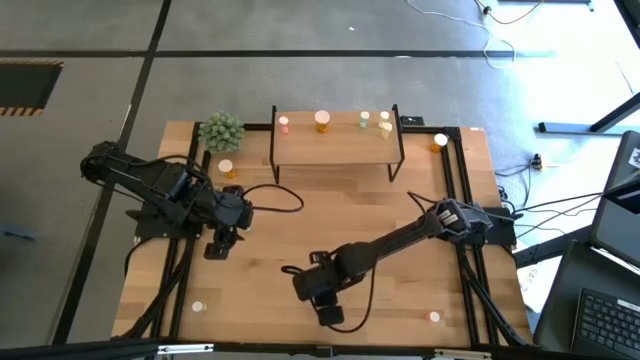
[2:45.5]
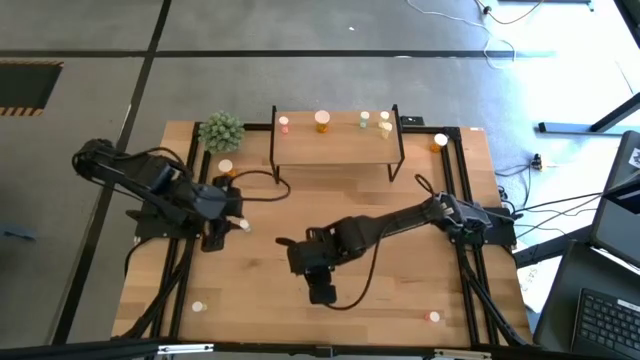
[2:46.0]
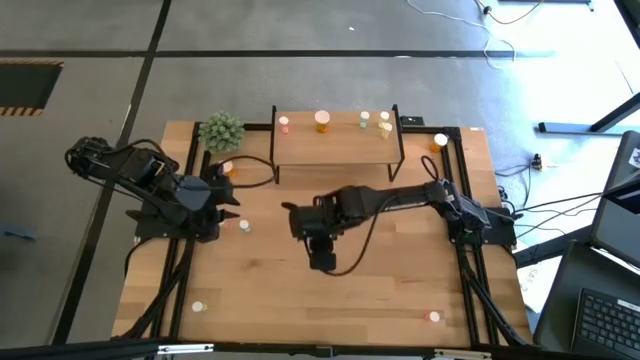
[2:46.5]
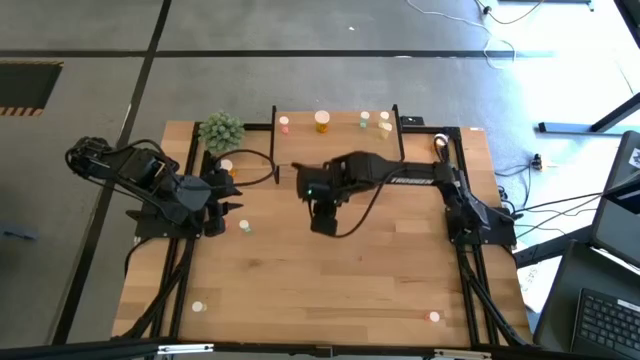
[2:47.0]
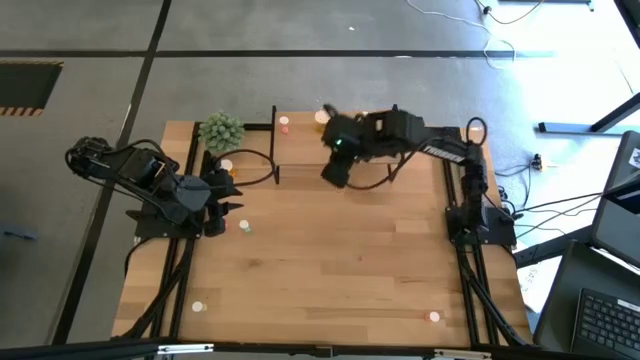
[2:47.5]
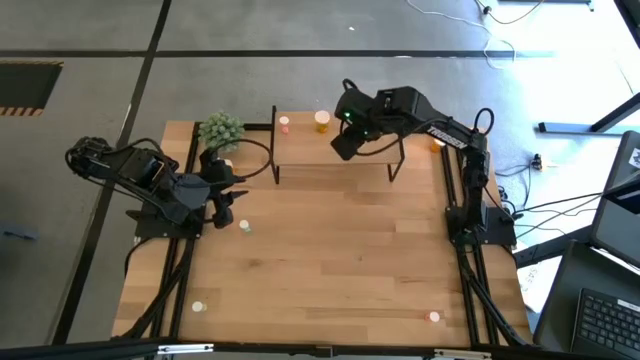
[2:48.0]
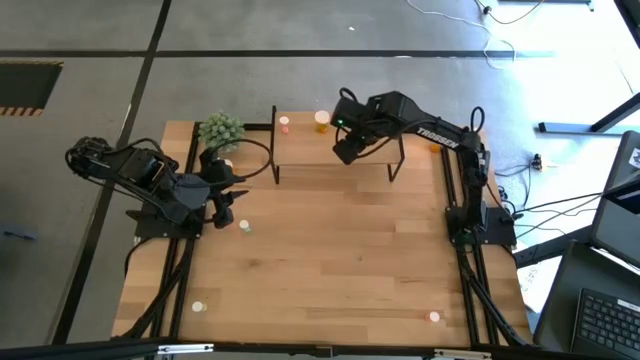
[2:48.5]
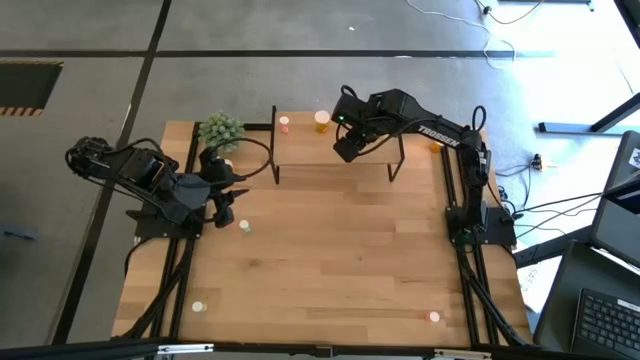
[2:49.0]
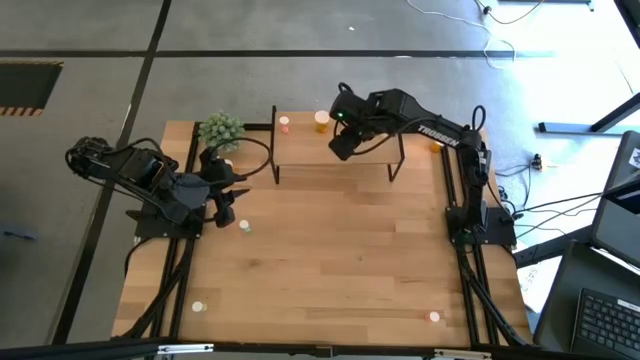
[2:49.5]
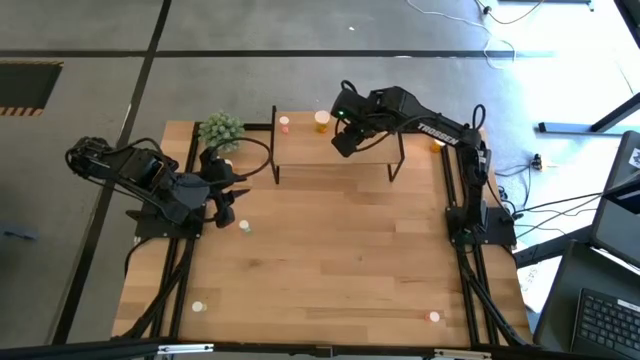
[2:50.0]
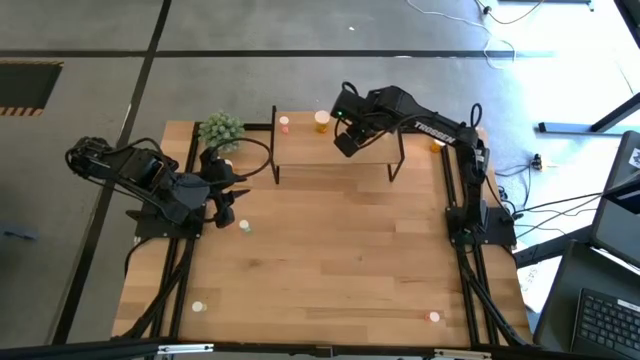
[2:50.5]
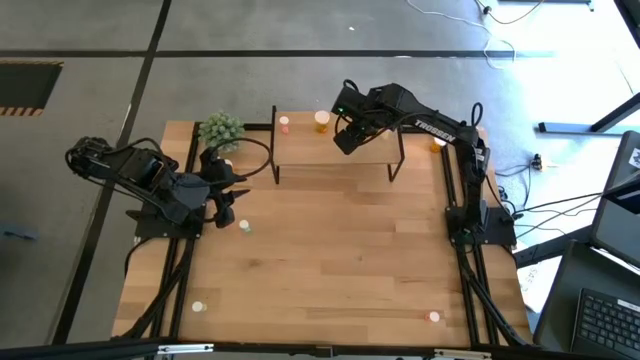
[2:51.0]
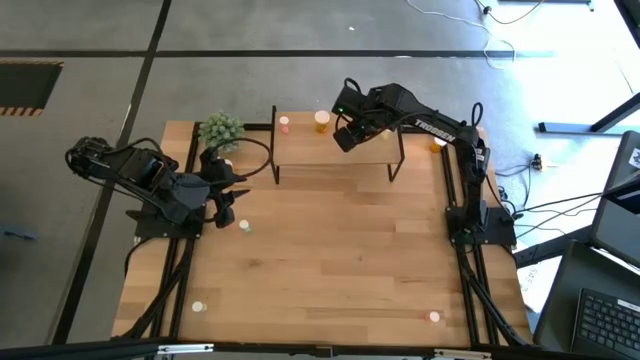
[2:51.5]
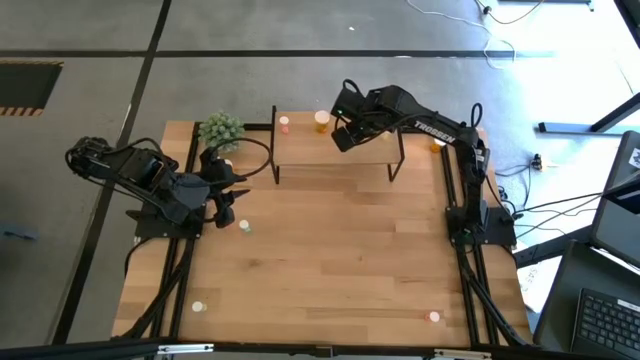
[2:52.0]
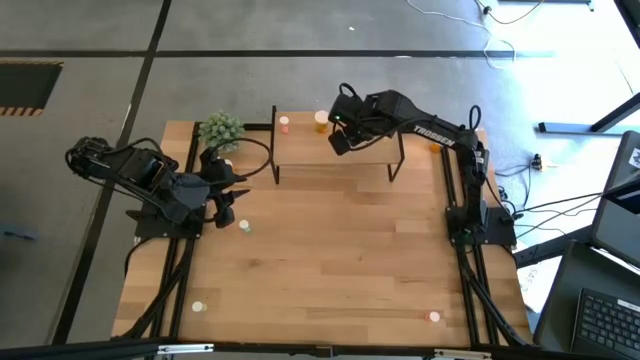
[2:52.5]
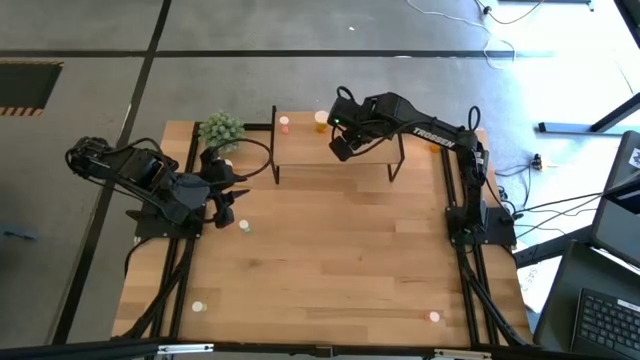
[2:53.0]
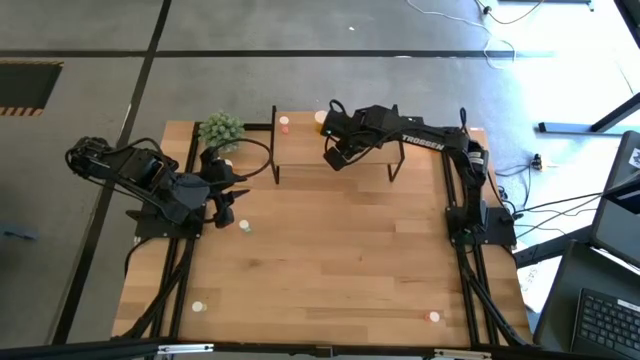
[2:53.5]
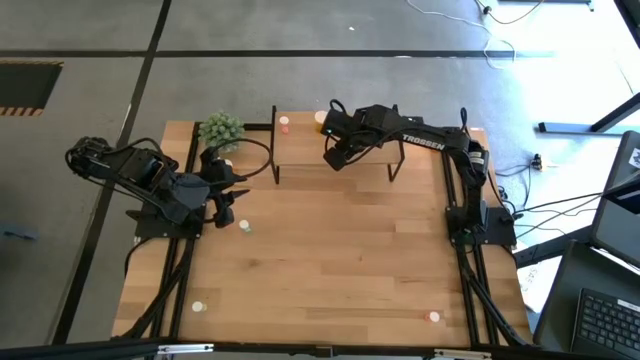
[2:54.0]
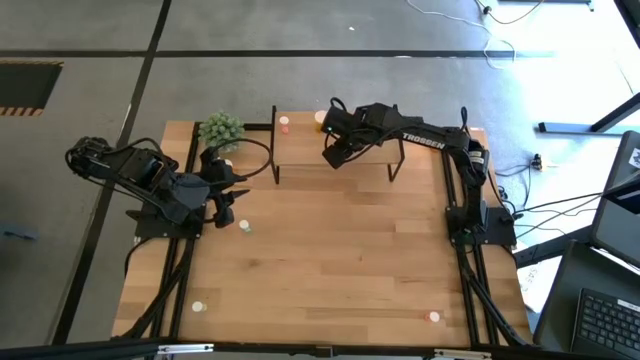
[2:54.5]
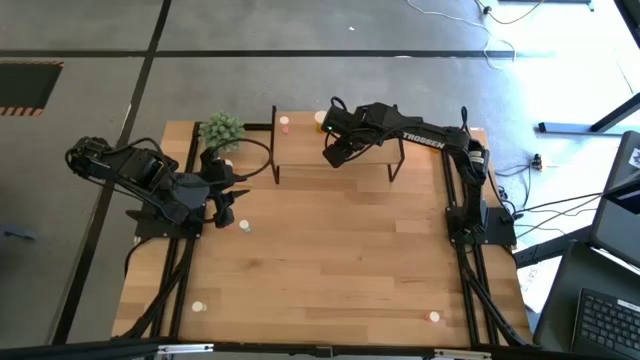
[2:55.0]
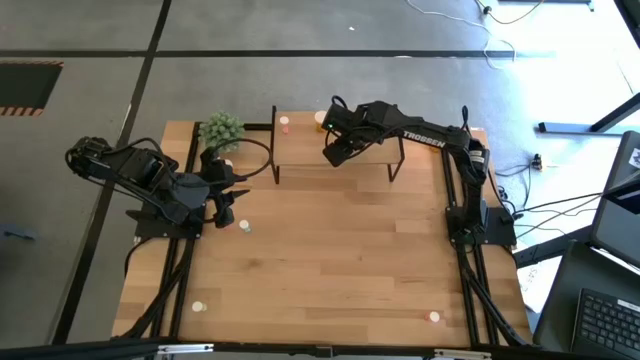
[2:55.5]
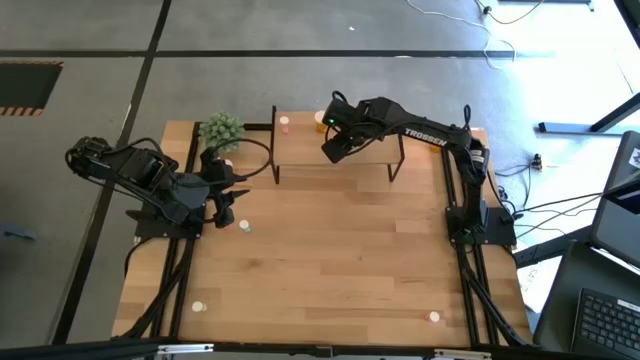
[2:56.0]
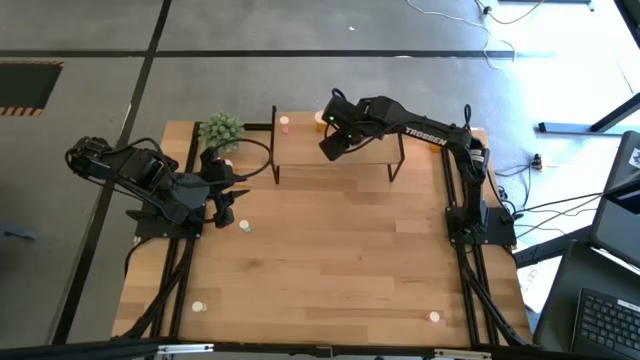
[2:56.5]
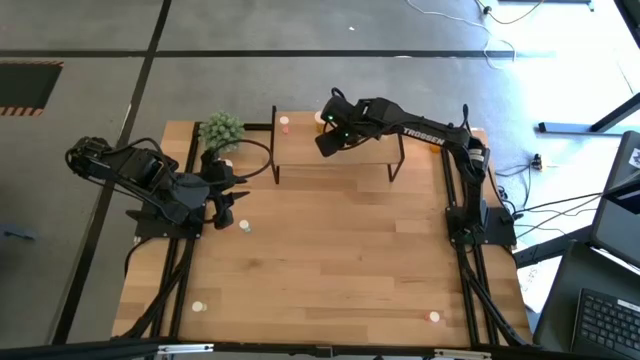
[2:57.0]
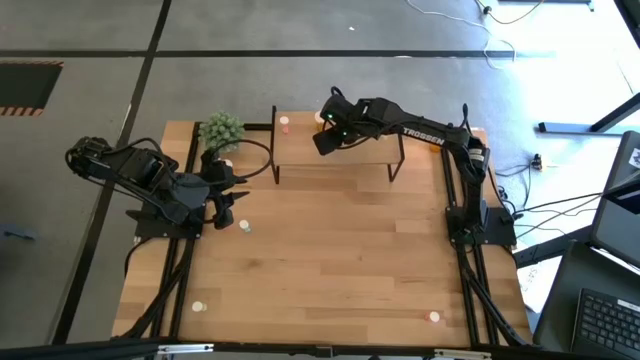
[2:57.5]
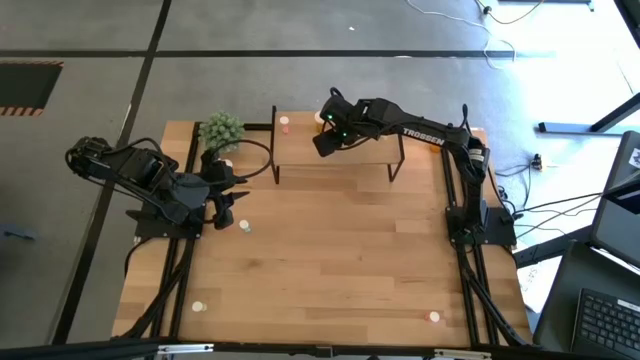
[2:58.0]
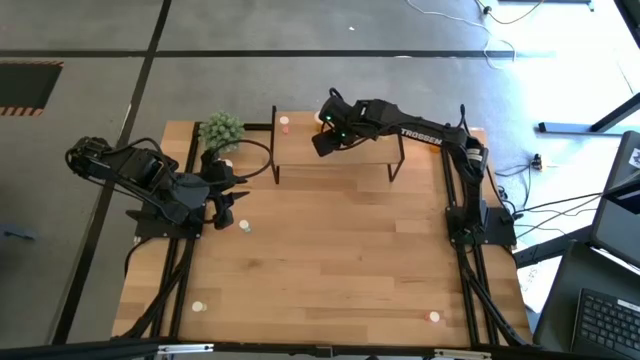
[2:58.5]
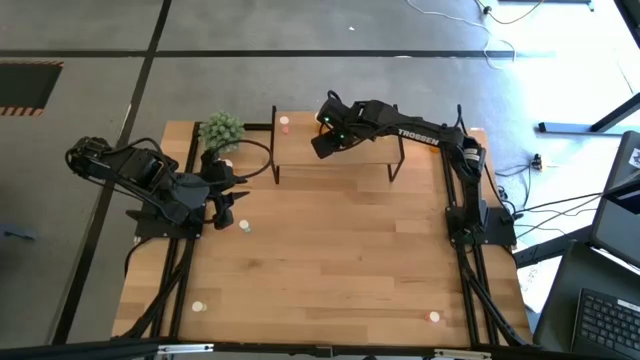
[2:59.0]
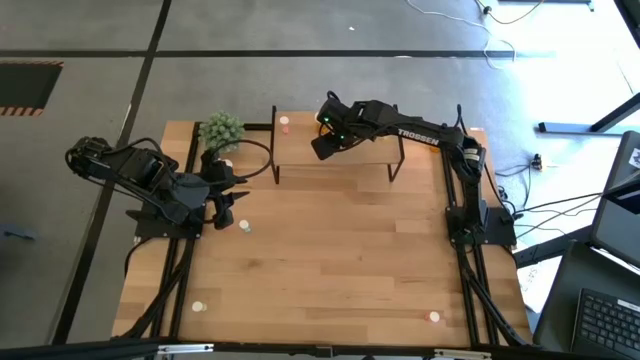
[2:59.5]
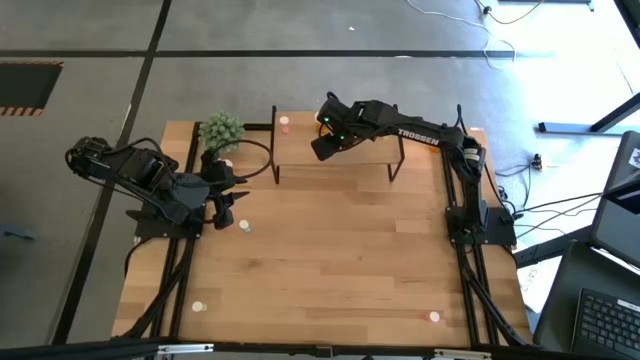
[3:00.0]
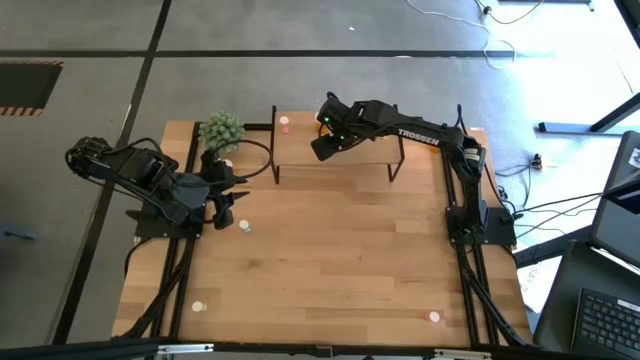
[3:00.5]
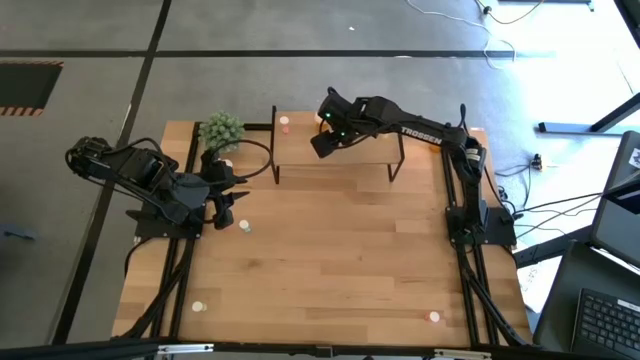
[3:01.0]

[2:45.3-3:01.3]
Task: Pick and place medicine bottles onto shelf by color
Put the bottom blue medicine bottle on the shelf

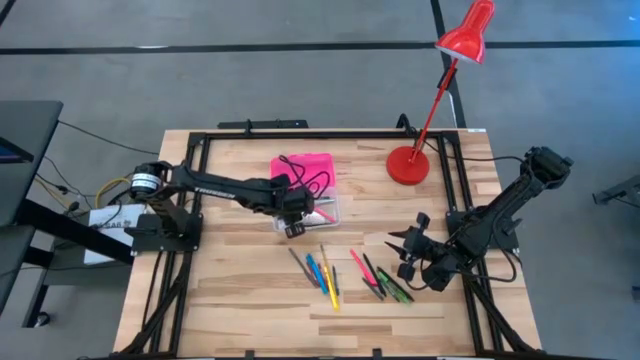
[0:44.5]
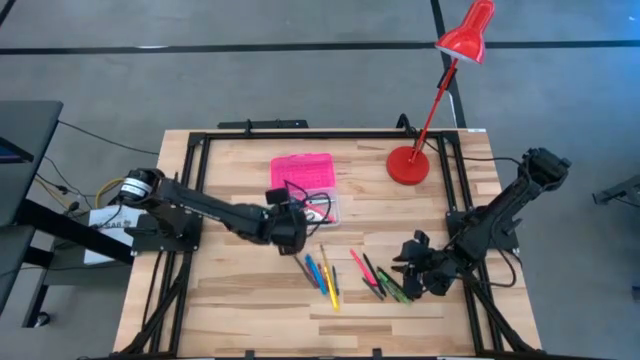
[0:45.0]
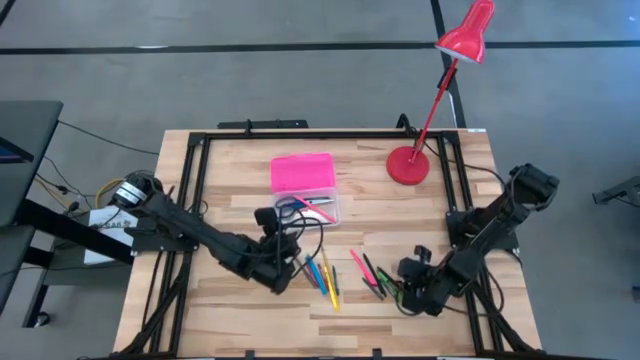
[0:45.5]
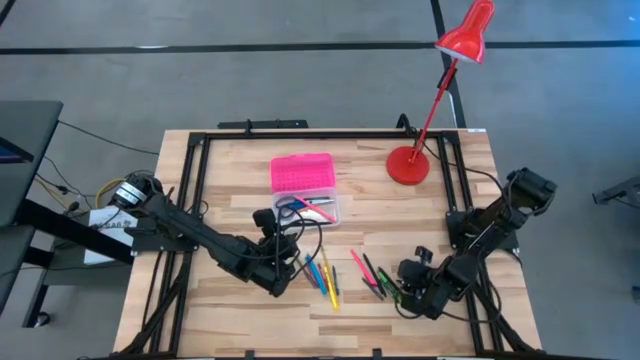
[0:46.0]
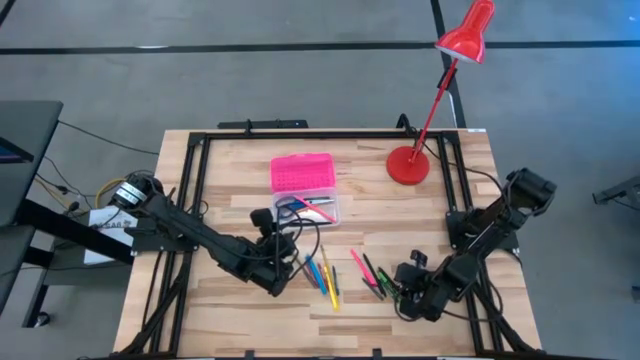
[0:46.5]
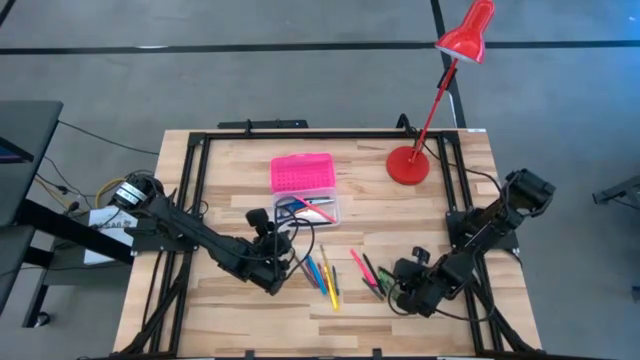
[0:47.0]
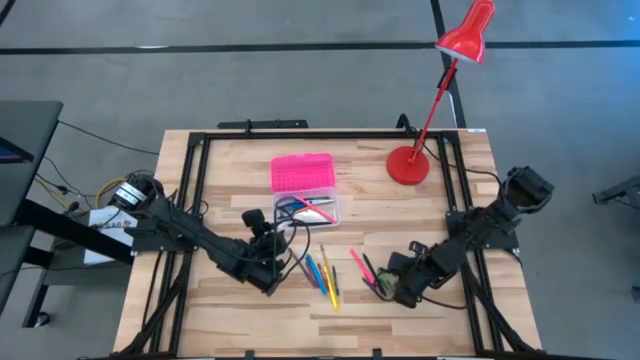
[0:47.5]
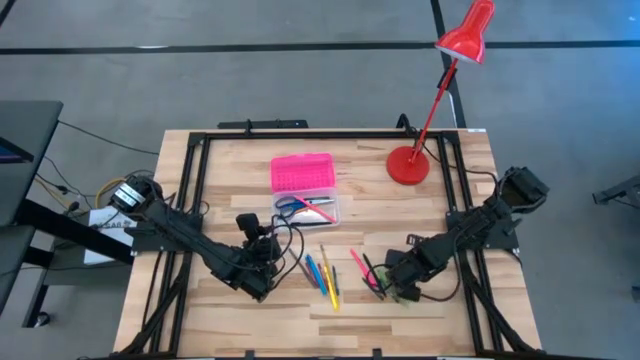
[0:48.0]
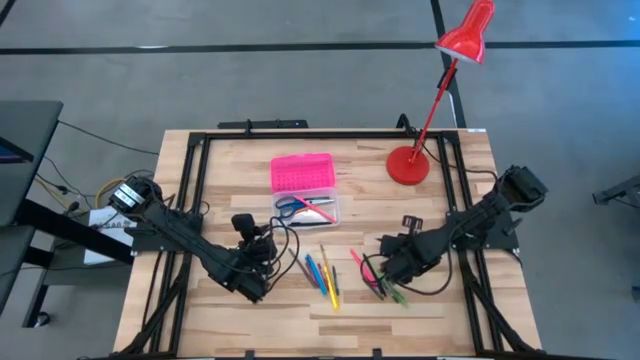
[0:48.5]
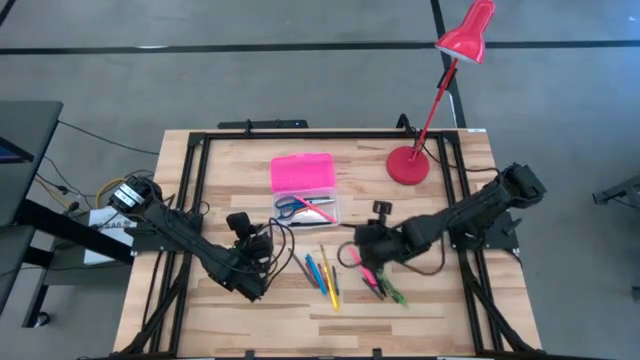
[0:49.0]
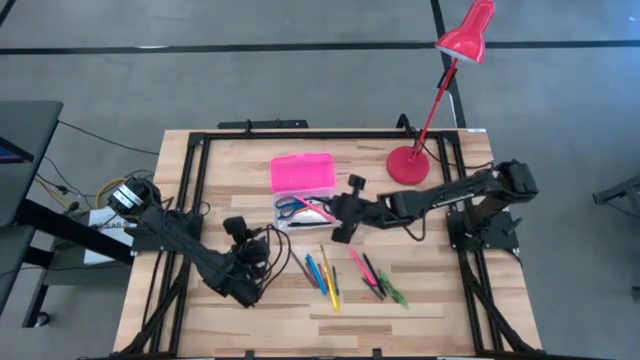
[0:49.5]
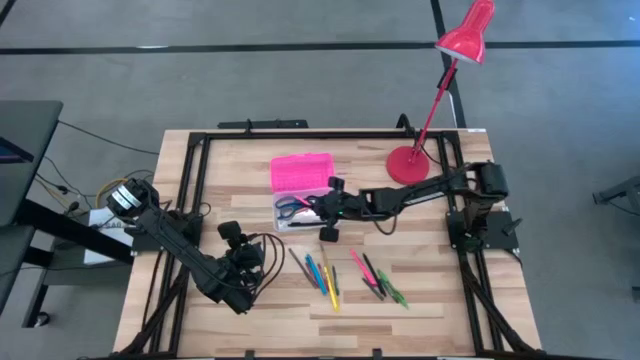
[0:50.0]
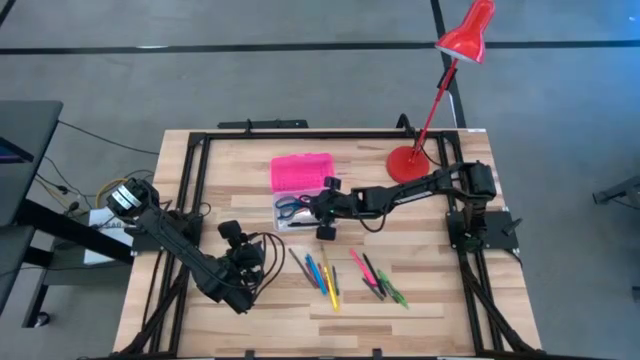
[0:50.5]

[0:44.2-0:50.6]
Task: Pick & place school supplies into a supply box
Put the black pen into the pink supply box
